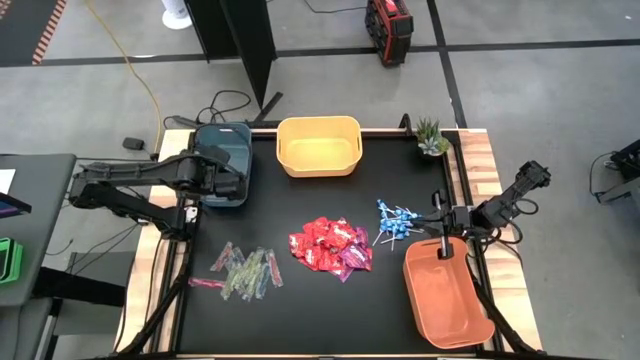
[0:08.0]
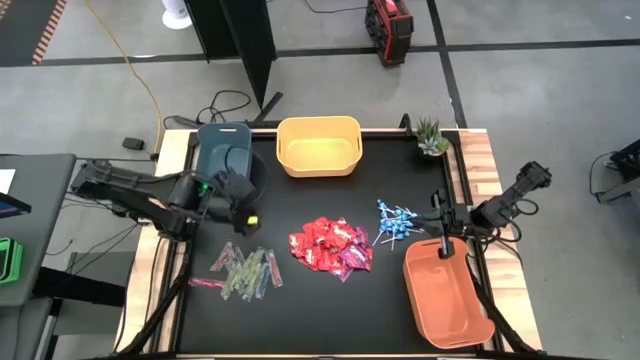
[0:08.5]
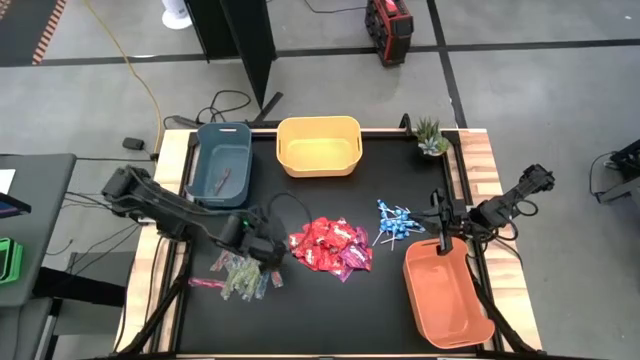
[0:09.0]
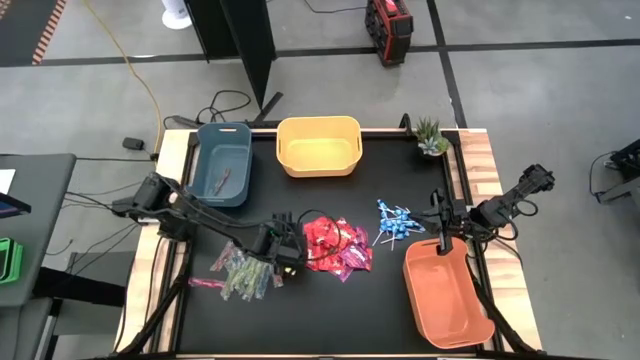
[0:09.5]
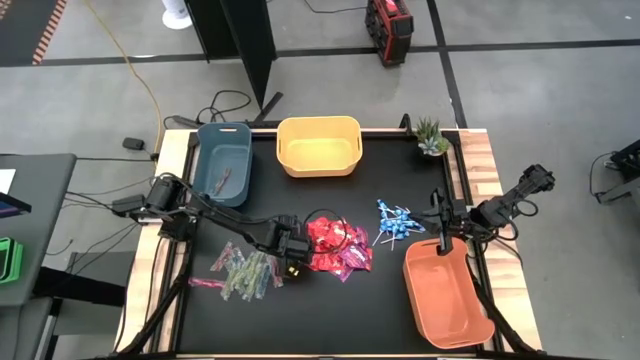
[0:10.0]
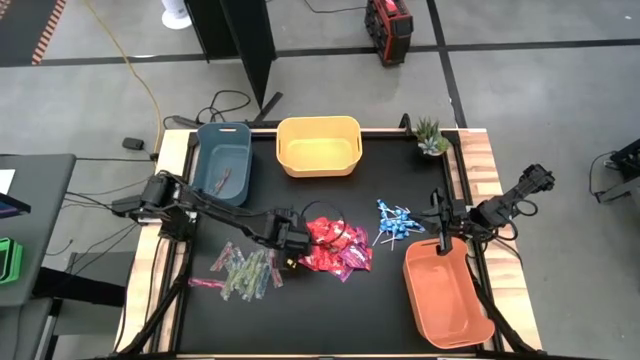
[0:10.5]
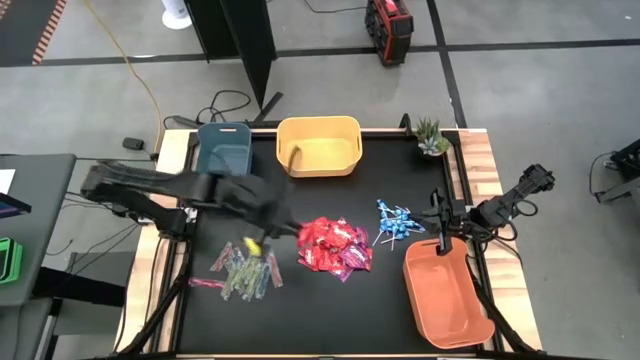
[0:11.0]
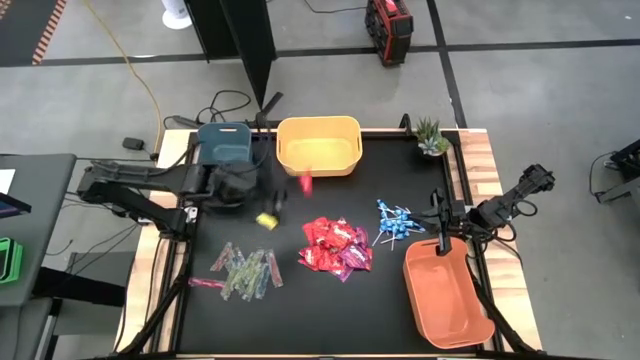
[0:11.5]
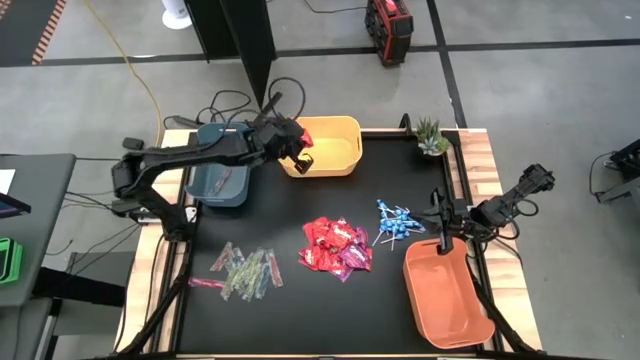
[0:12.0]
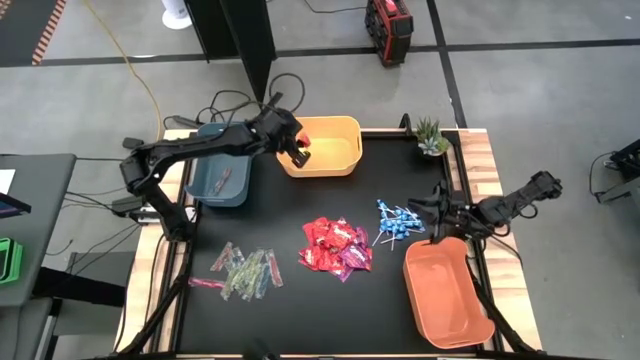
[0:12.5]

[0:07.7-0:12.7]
Task: Sort candy
Put the red candy into the yellow bin

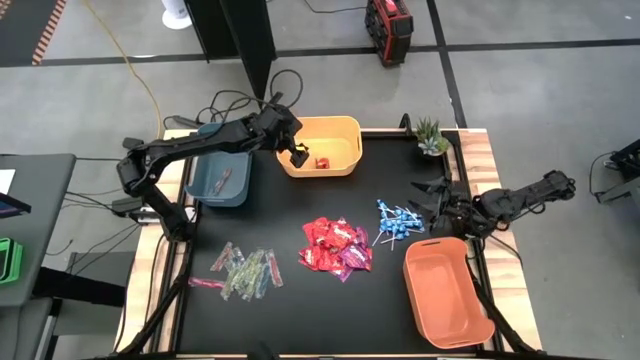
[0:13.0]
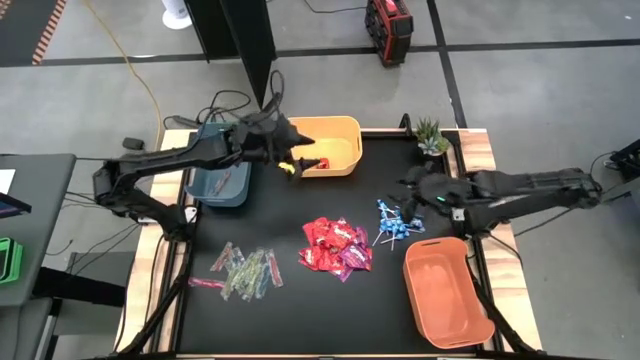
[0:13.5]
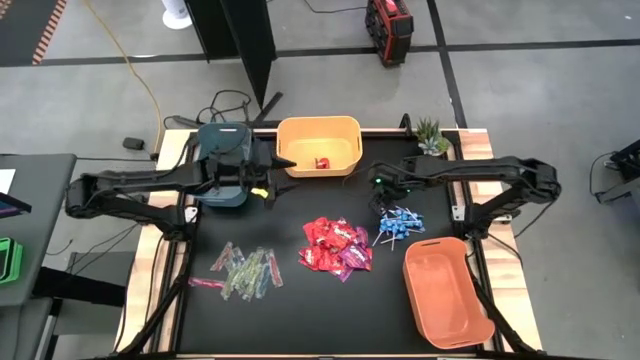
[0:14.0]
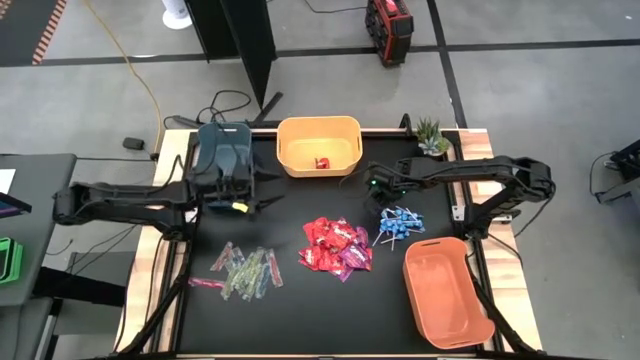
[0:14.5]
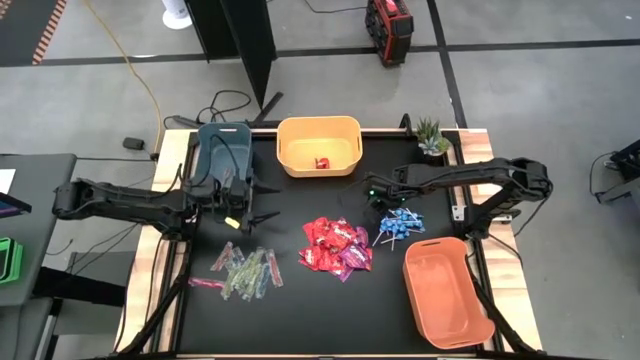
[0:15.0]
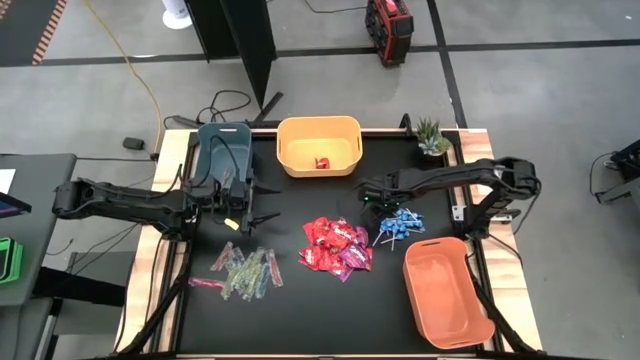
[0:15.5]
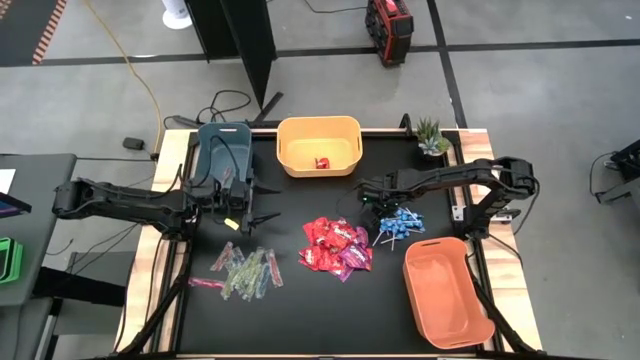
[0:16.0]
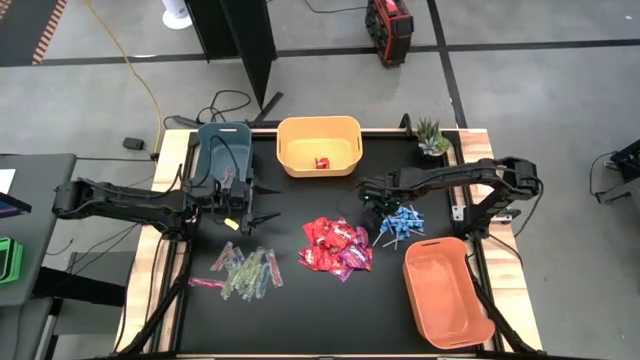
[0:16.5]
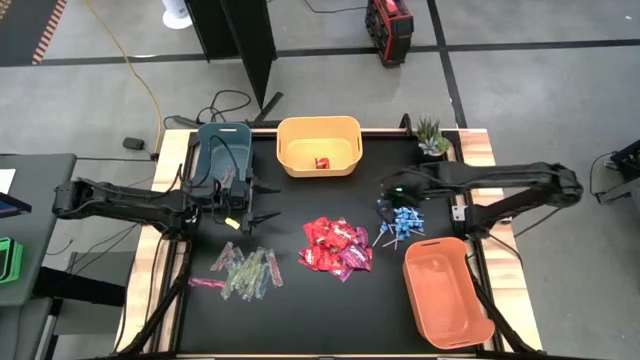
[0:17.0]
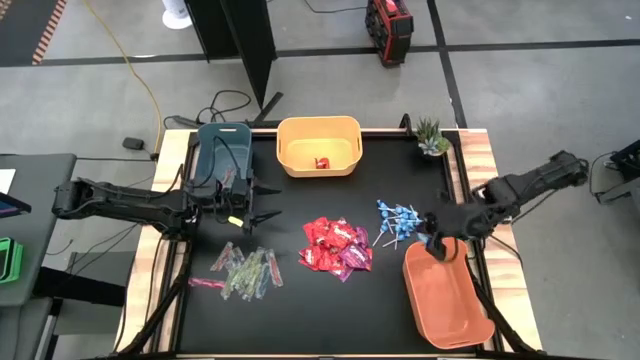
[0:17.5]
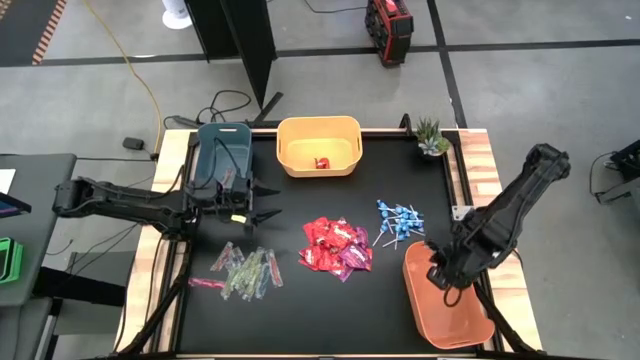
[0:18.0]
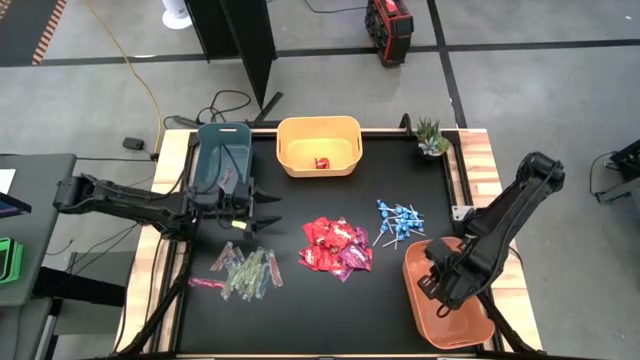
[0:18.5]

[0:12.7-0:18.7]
Put the blue lollipop into the orange bin

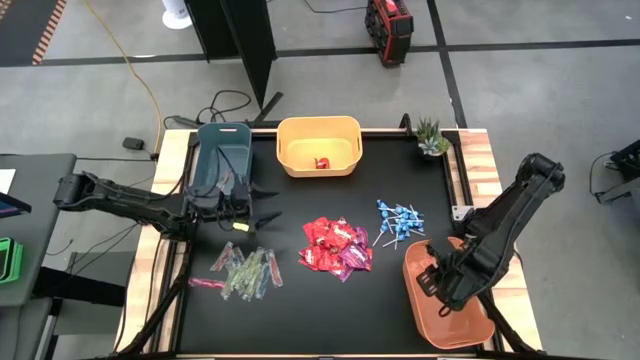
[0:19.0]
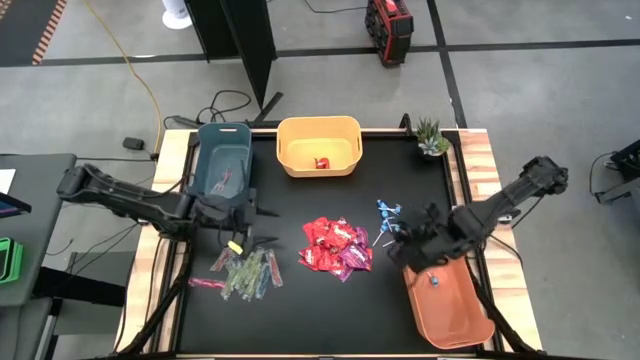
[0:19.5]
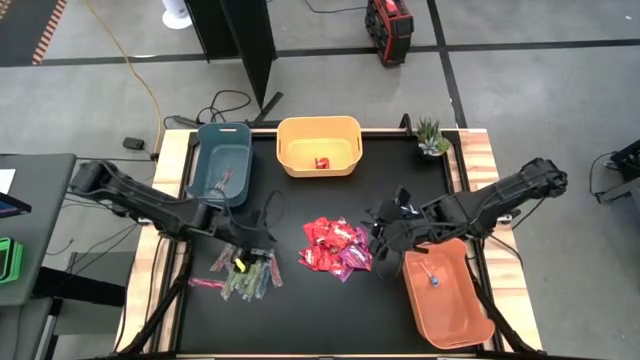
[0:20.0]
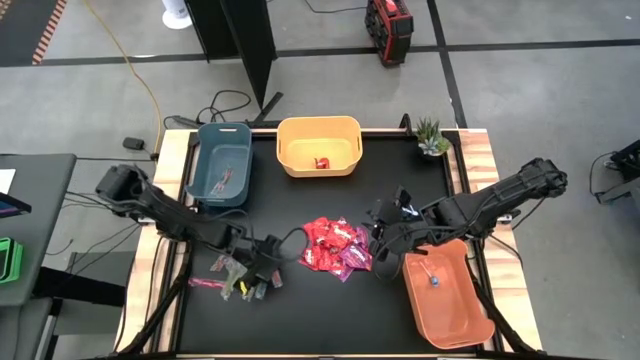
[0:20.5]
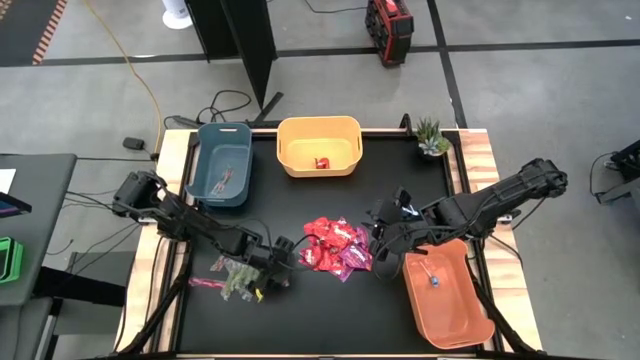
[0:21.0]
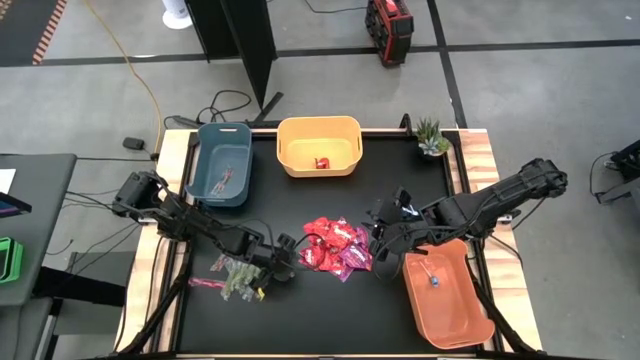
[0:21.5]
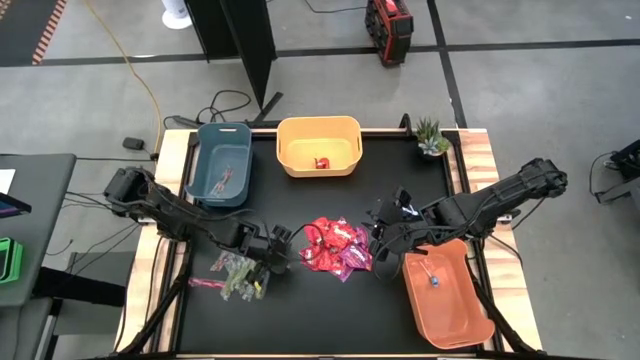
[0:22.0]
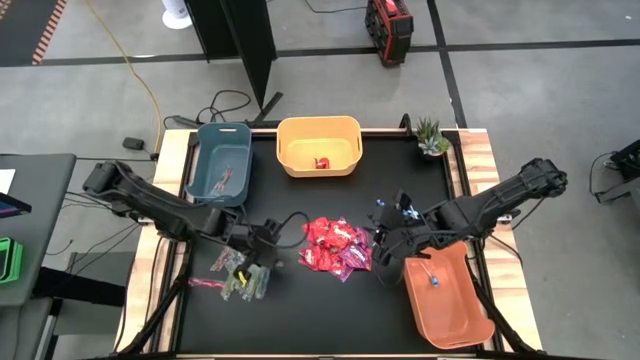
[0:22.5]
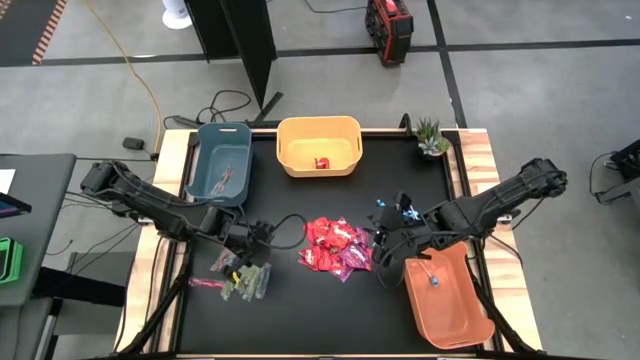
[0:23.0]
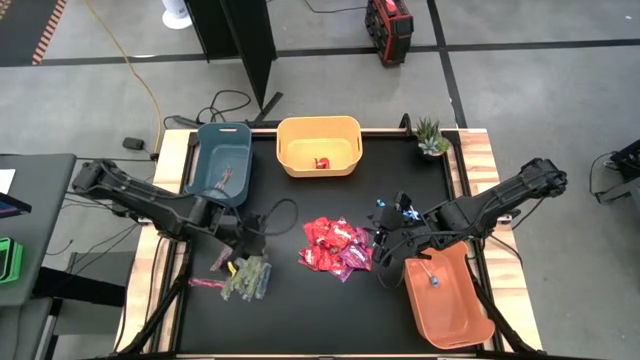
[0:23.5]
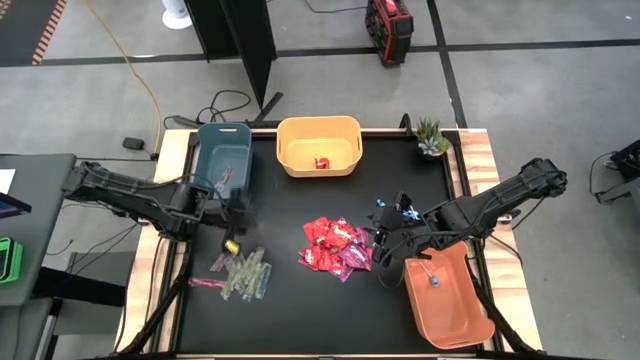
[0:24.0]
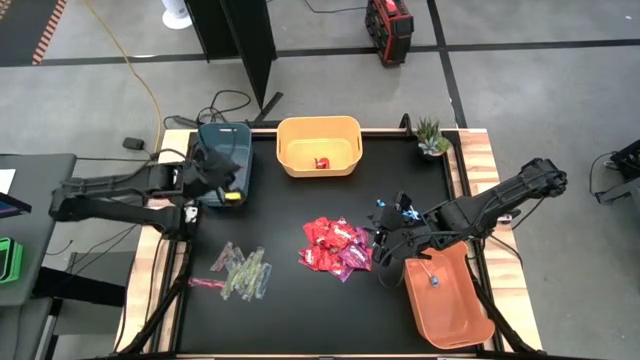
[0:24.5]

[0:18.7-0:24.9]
Put the red gummy into the blue bin

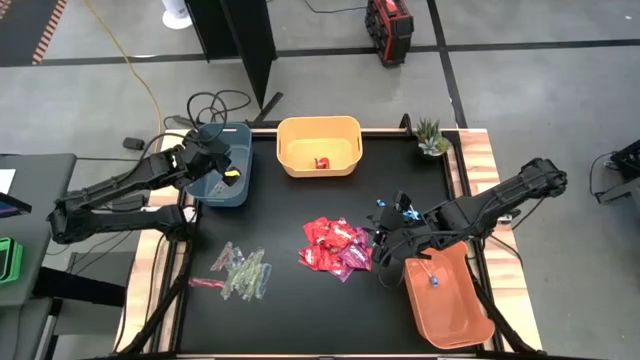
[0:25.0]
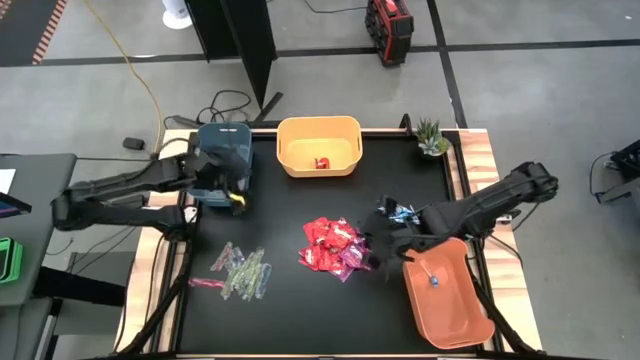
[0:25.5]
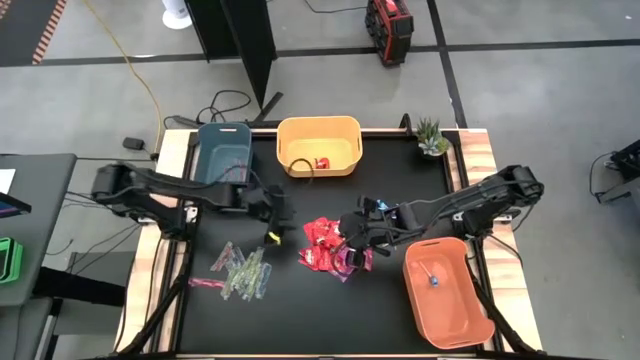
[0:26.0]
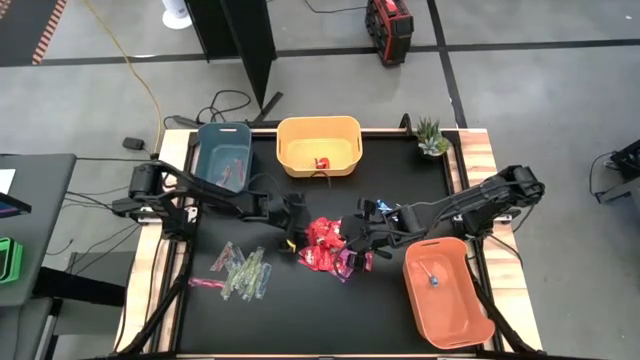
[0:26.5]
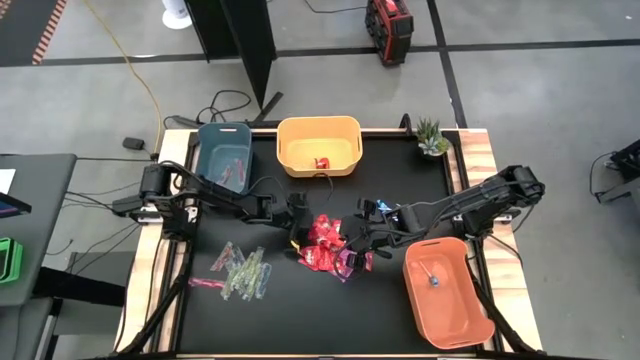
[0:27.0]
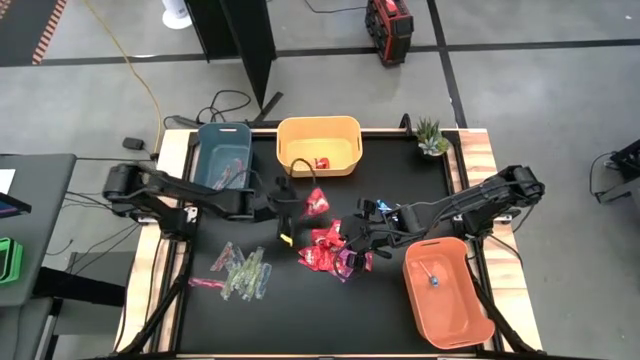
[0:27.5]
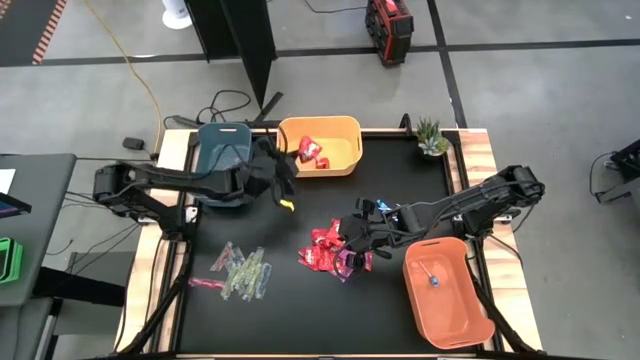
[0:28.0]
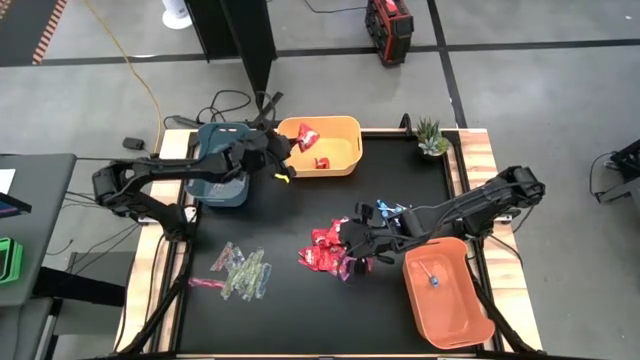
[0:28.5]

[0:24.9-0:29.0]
Put the red candy into the yellow bin

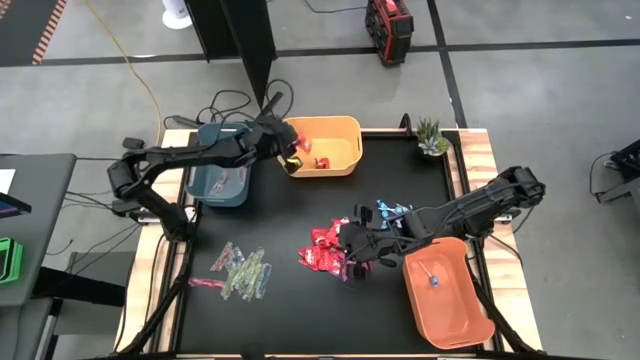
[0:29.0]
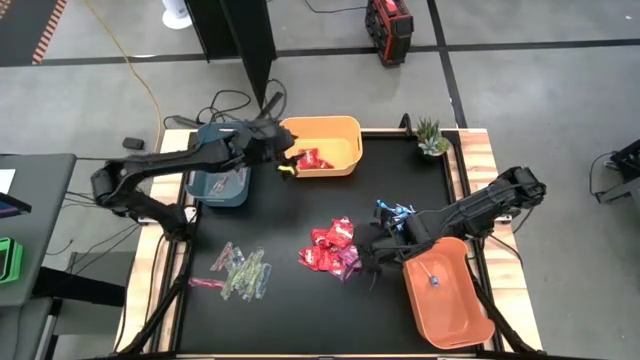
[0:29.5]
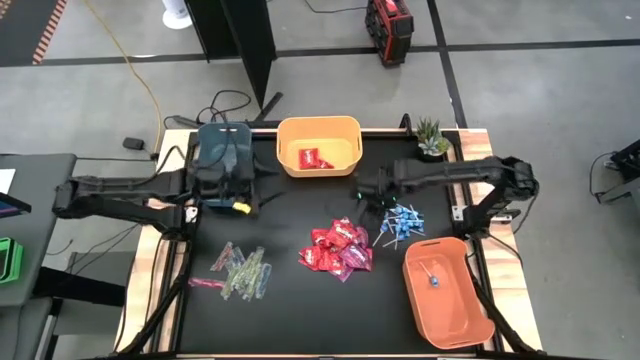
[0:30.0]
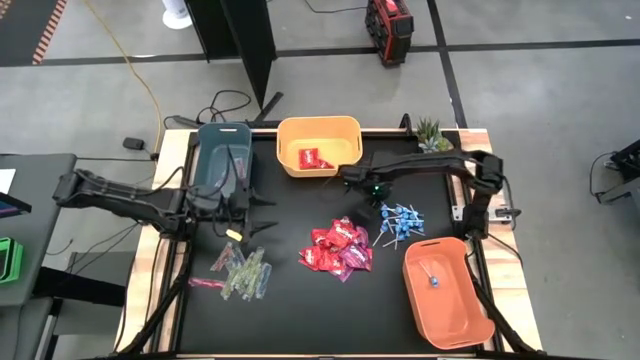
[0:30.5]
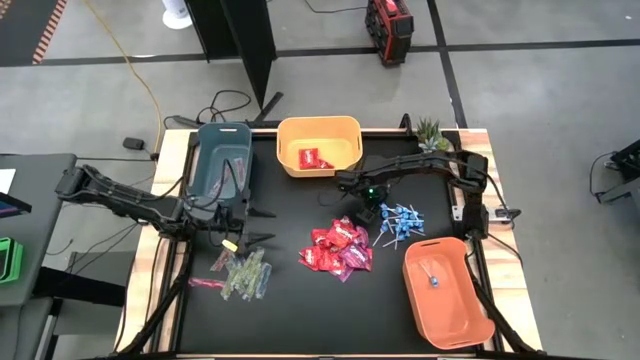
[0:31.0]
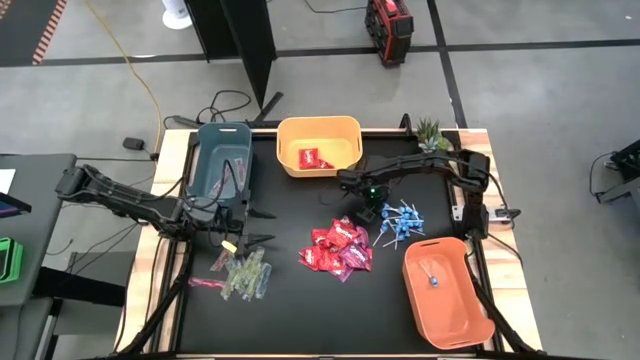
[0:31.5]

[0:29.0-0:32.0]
Put the blue lollipop into the orange bin
